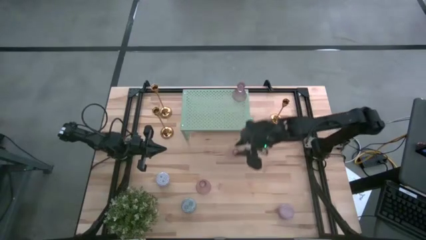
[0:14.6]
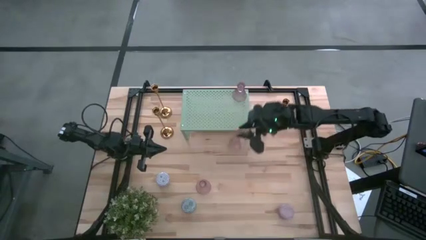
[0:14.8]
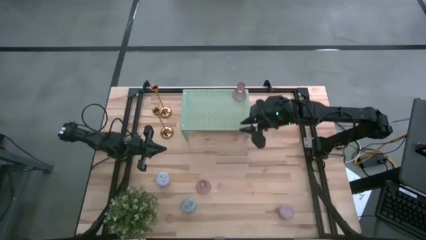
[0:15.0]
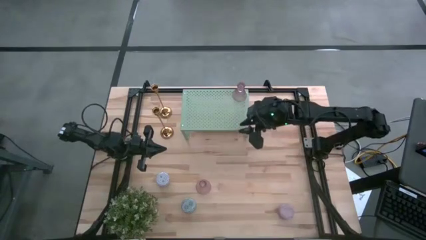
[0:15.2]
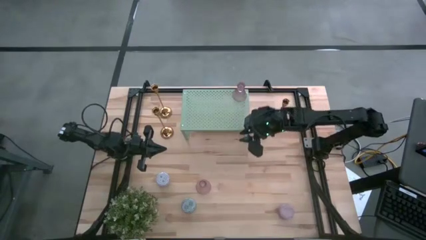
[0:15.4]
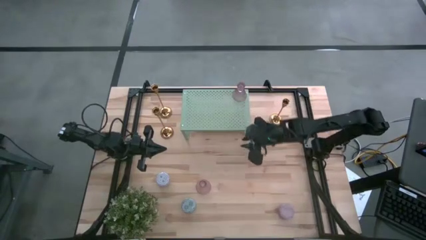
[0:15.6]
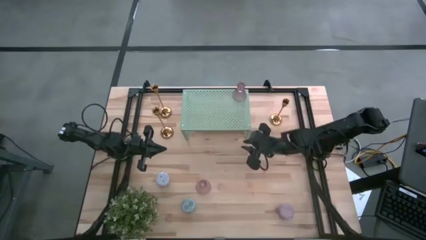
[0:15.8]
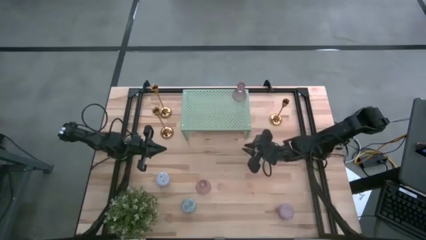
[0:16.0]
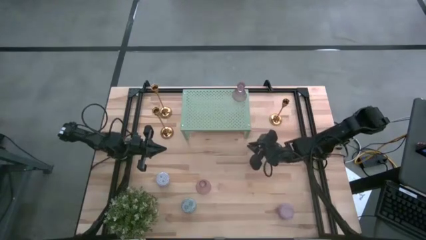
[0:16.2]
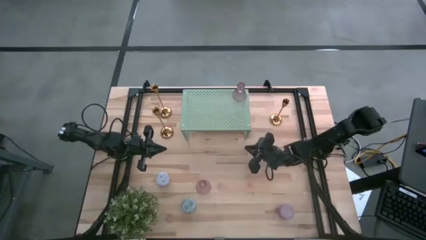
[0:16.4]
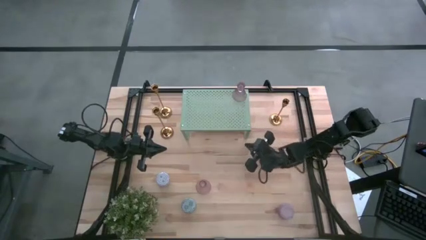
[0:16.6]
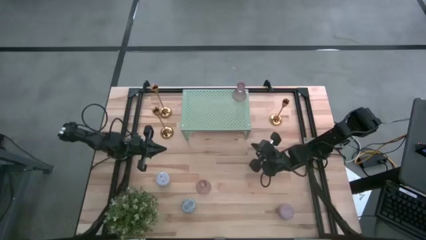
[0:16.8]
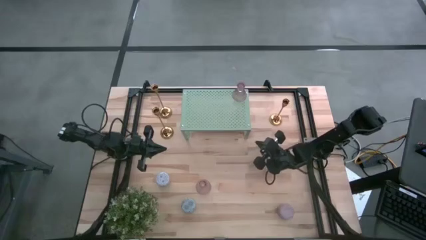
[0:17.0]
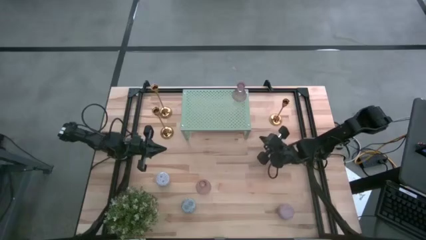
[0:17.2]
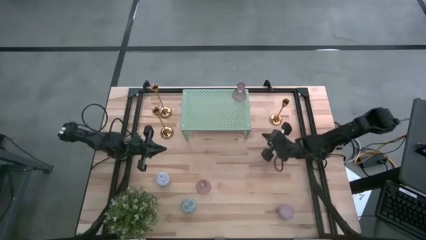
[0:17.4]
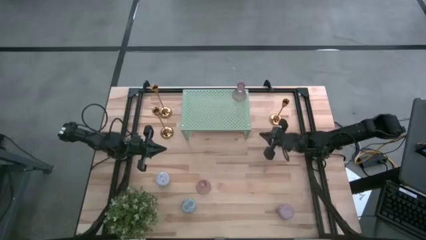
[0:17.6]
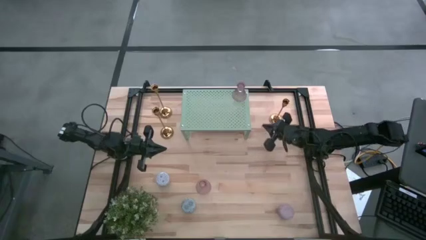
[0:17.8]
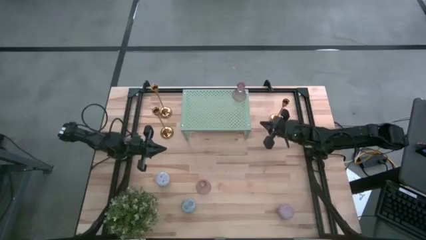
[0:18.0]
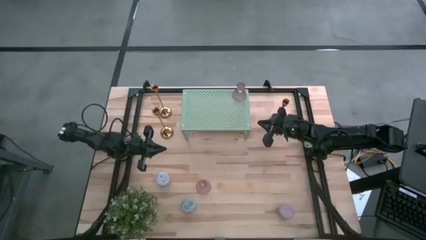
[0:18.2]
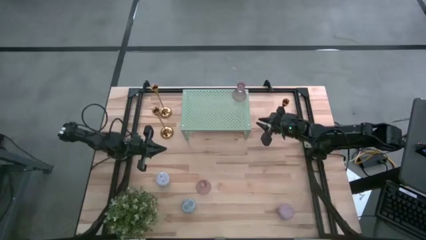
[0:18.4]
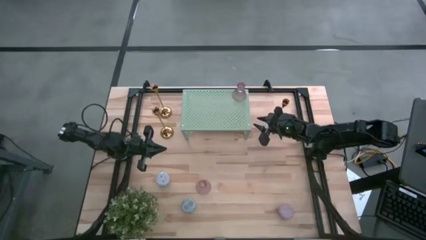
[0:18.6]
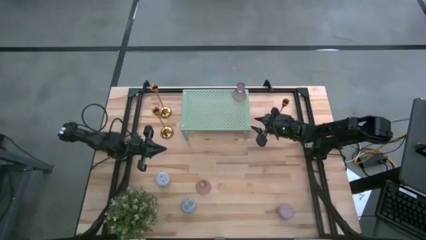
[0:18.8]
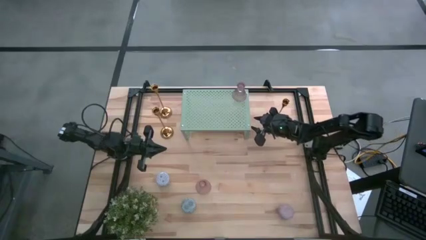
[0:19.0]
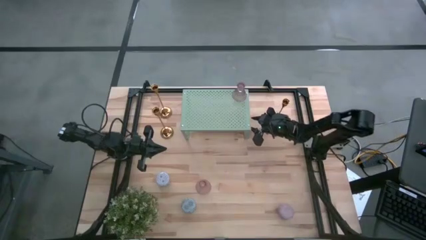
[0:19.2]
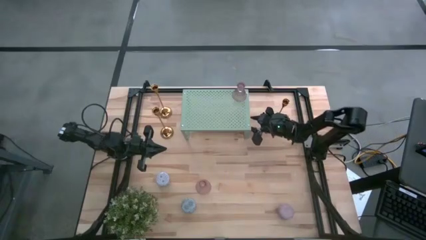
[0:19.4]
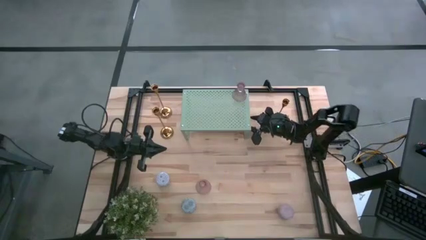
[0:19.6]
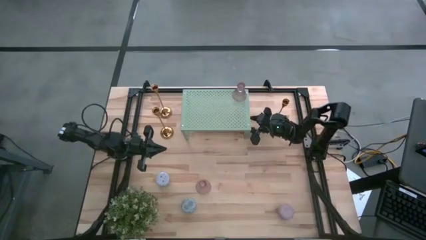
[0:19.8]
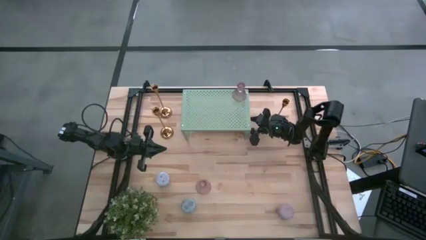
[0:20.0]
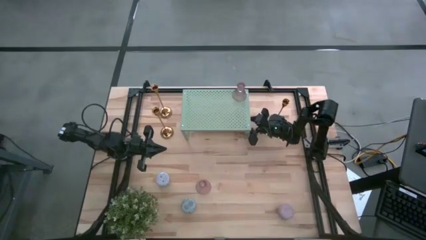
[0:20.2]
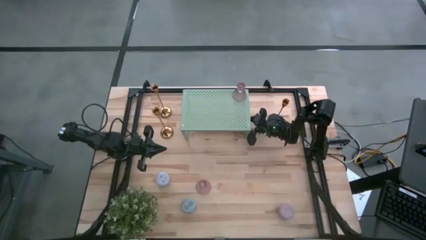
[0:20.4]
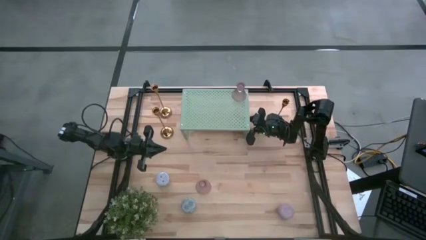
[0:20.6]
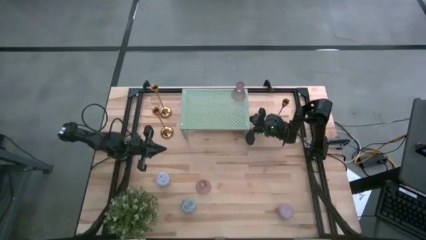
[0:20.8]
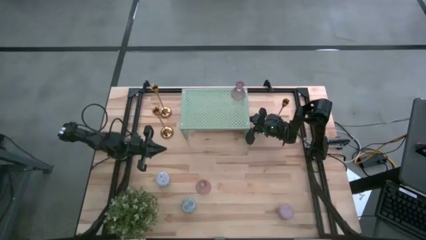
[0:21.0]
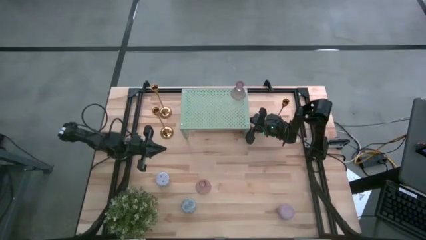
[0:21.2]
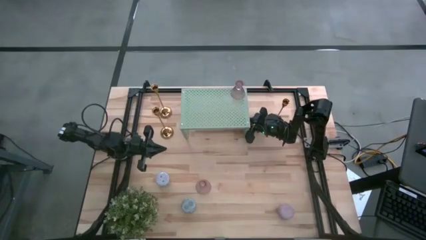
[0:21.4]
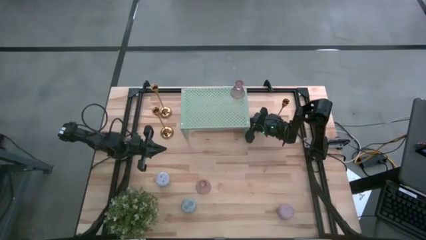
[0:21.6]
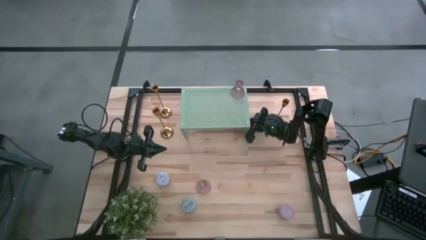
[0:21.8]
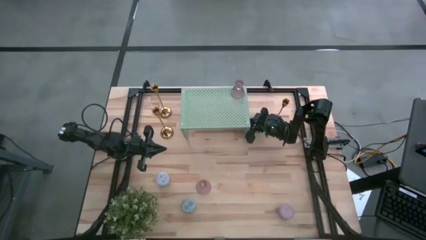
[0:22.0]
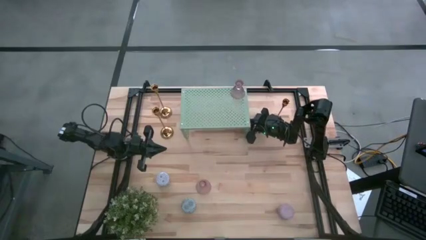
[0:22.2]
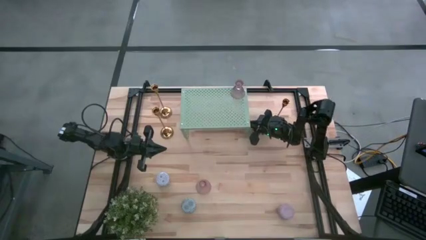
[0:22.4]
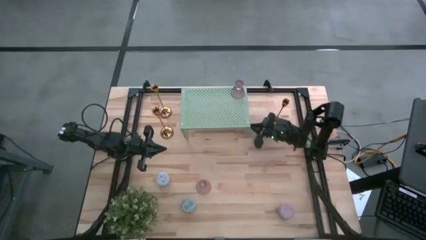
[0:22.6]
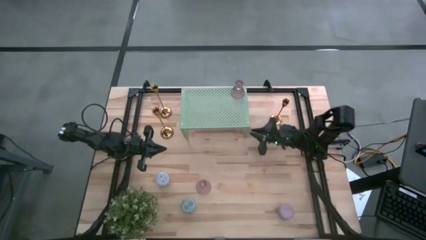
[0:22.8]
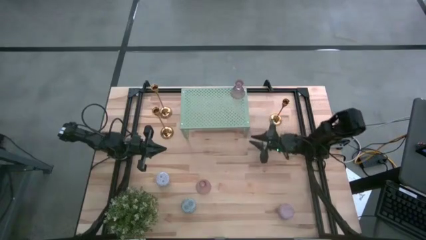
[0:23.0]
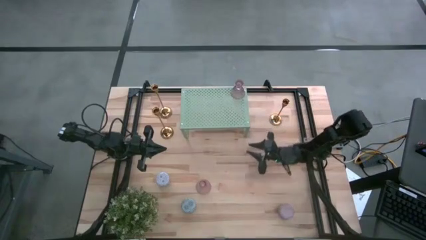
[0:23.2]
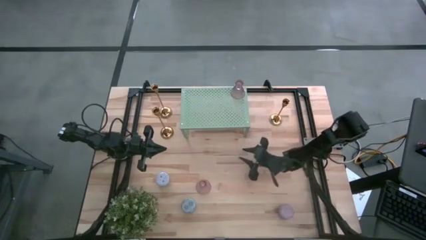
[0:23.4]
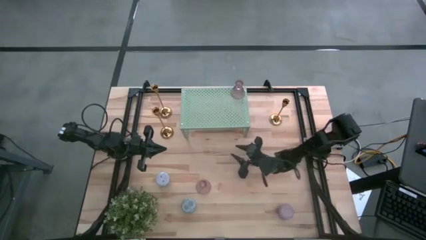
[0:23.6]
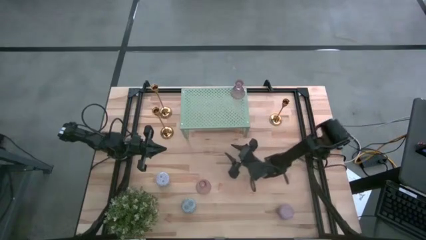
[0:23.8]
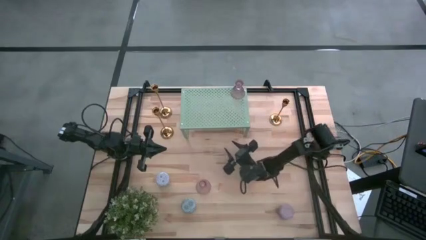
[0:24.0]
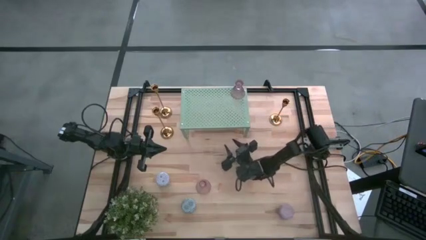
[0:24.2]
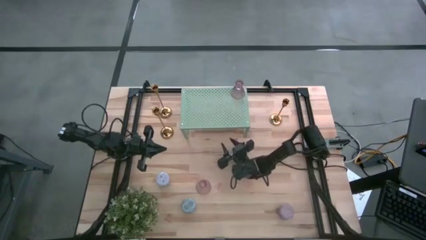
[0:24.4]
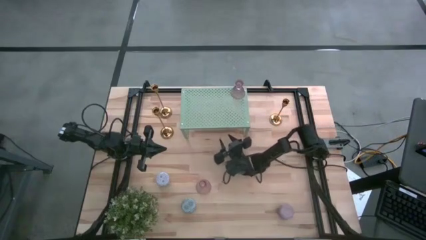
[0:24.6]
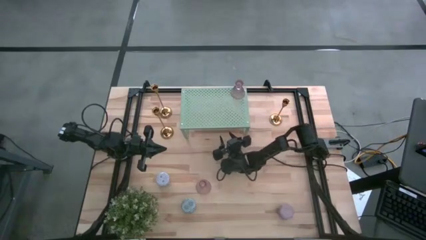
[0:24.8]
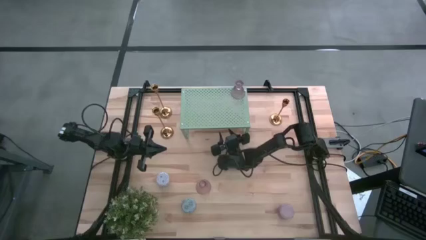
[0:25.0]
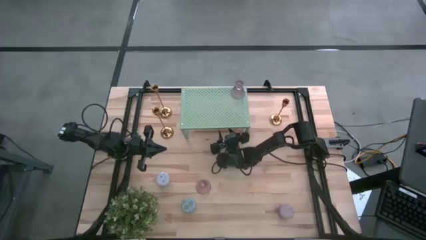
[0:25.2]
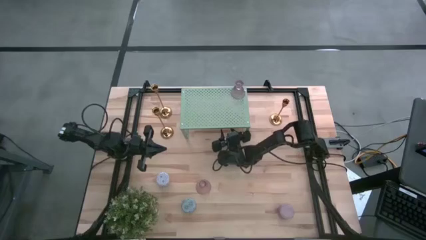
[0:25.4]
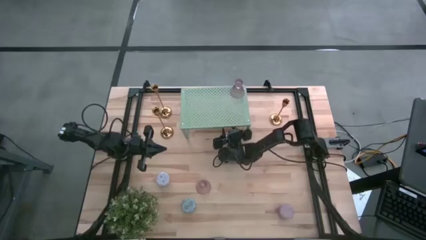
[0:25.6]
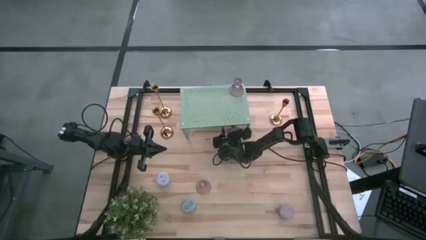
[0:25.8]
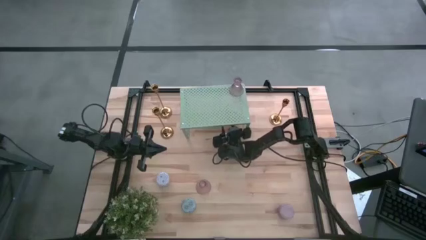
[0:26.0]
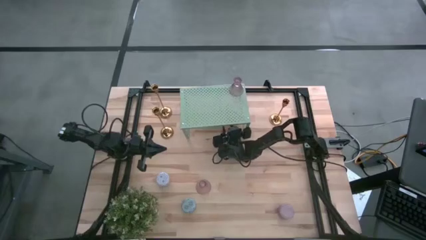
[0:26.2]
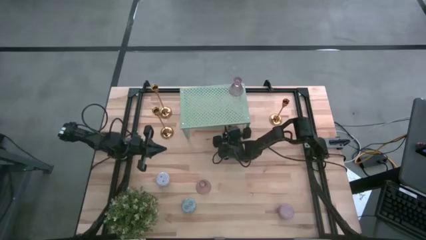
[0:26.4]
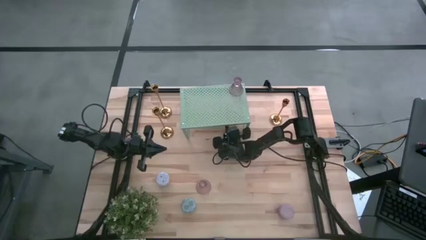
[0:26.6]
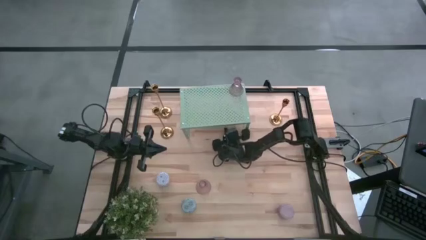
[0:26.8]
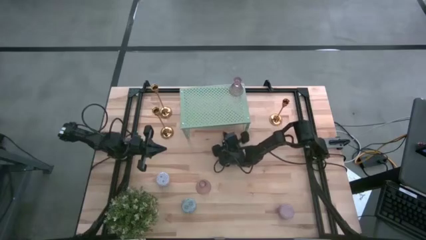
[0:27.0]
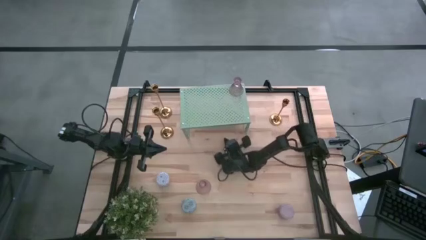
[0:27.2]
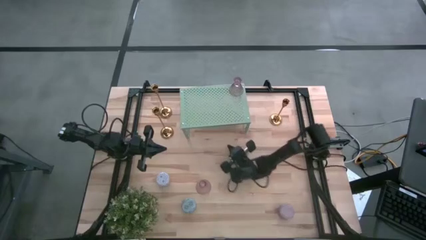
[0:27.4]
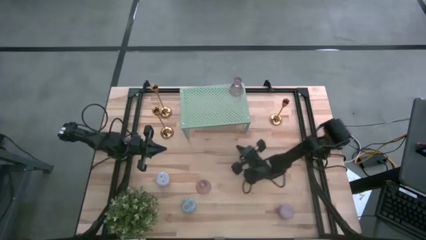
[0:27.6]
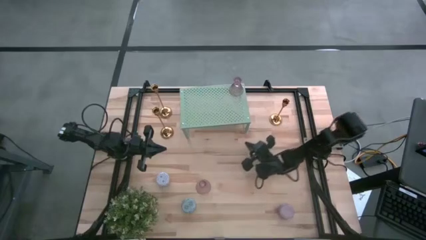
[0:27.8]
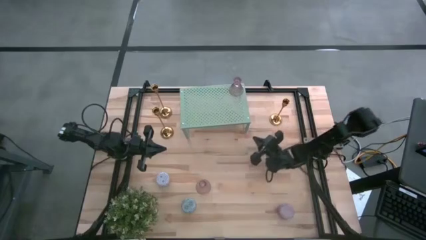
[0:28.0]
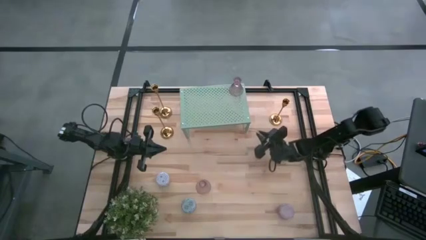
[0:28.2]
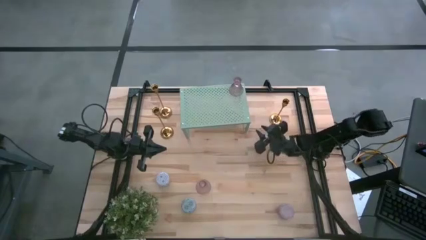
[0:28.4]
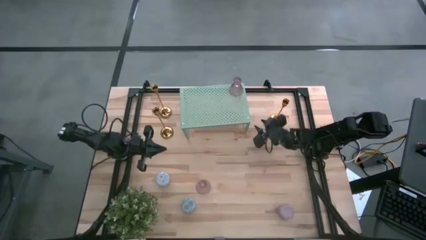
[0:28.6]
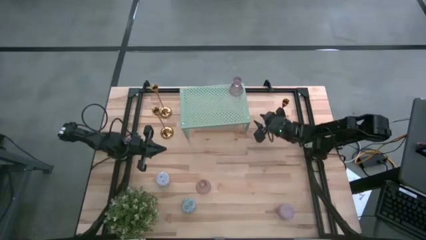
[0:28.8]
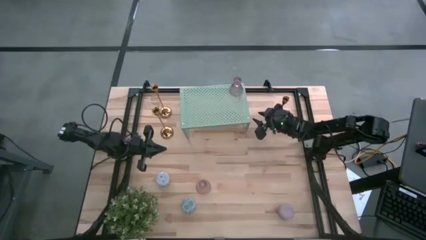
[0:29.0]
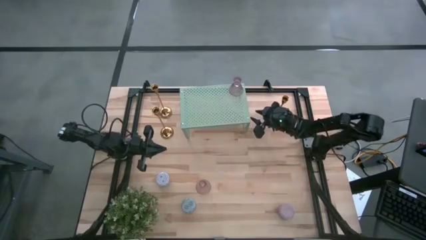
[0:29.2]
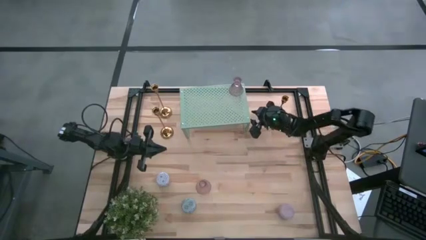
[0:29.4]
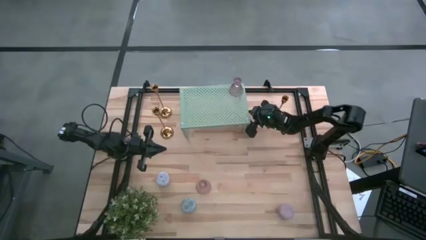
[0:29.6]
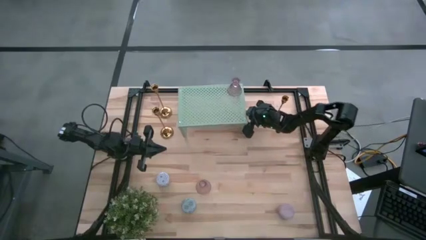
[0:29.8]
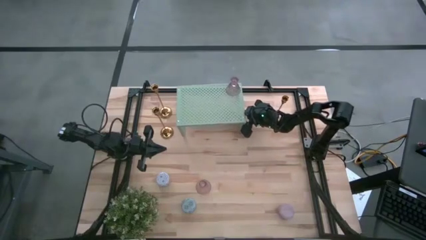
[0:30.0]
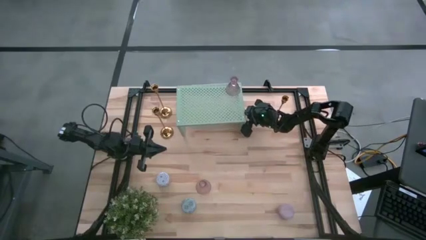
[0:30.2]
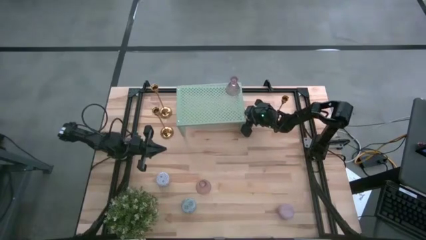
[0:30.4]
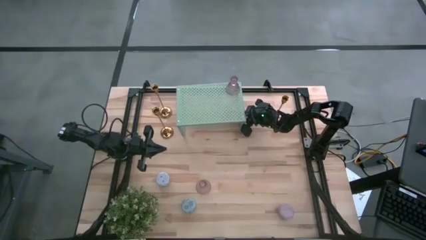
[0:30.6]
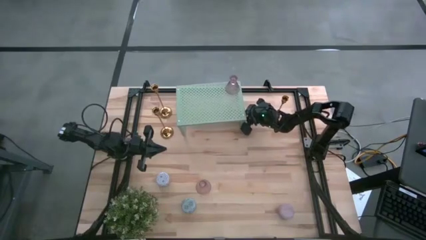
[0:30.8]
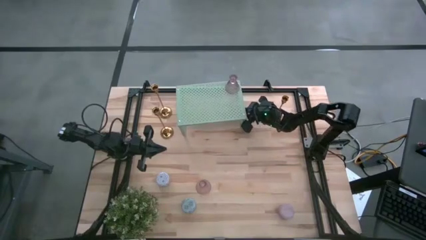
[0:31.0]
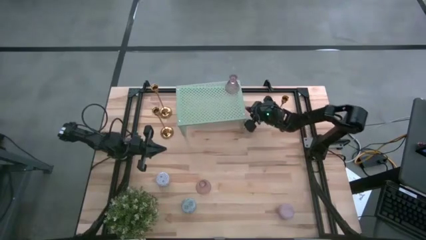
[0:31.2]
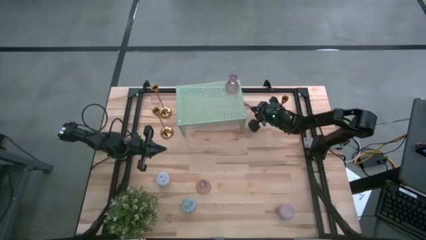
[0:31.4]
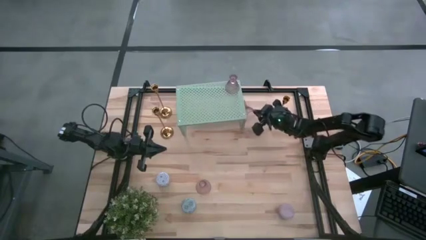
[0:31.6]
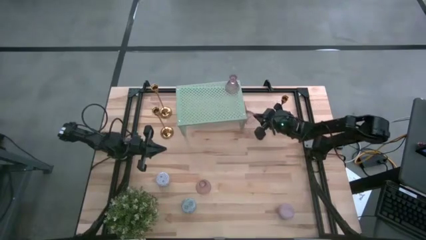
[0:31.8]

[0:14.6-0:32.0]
Task: Pick & Place candle stick holders
Put the top glass candle holder on the shelf aligned with the other glass candle holder
